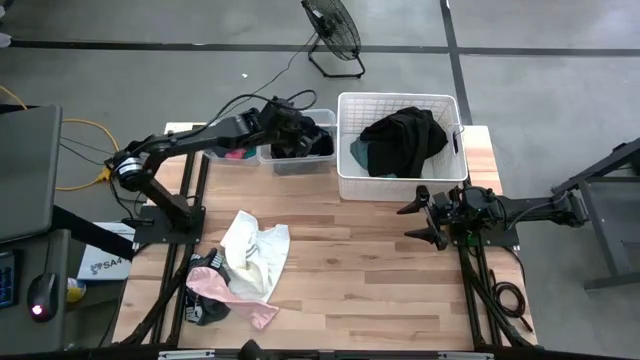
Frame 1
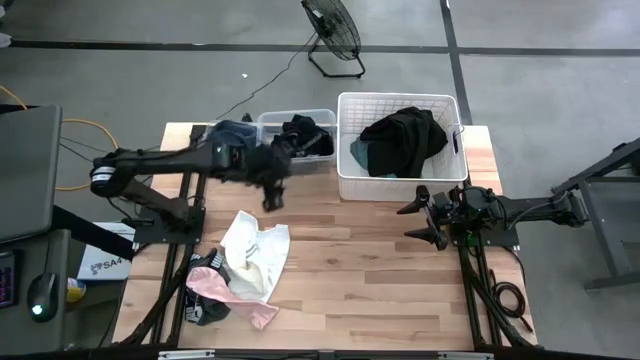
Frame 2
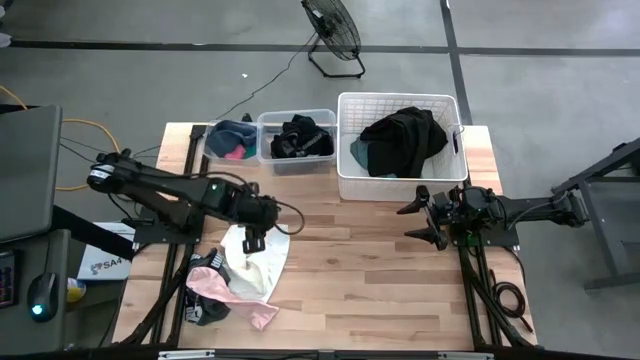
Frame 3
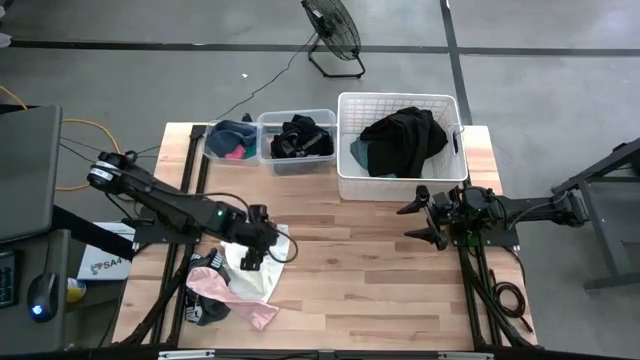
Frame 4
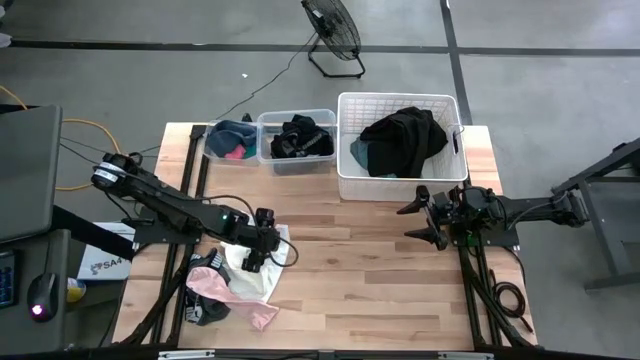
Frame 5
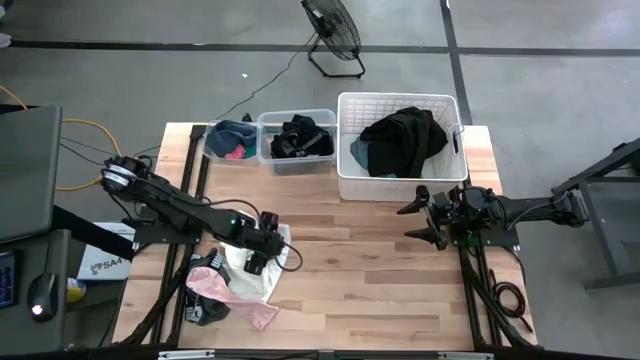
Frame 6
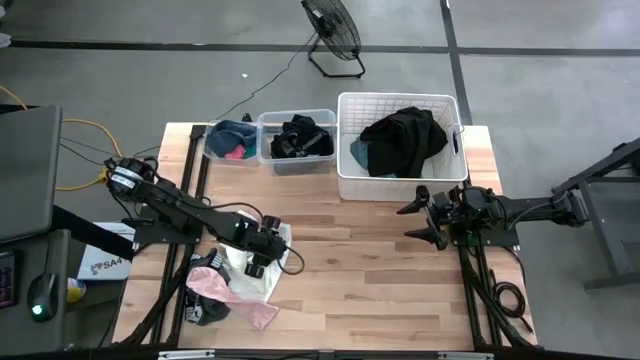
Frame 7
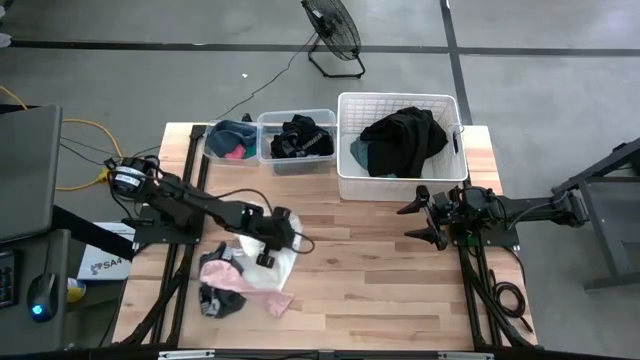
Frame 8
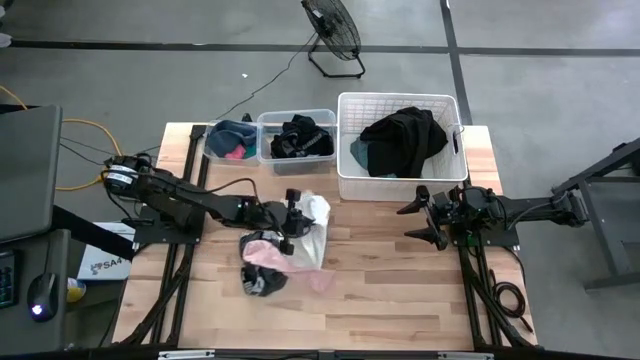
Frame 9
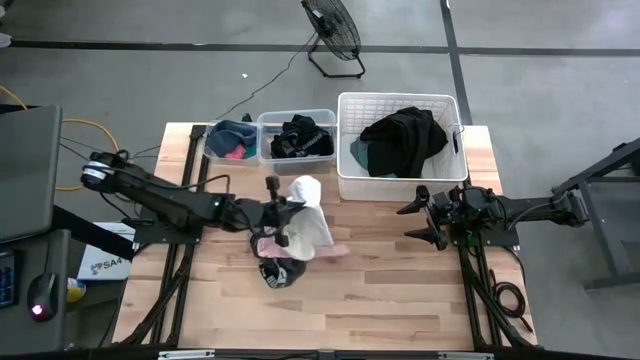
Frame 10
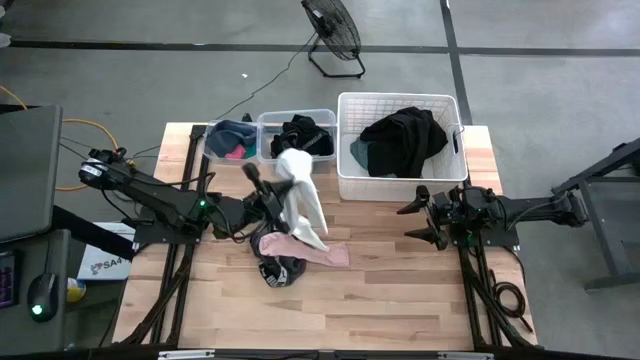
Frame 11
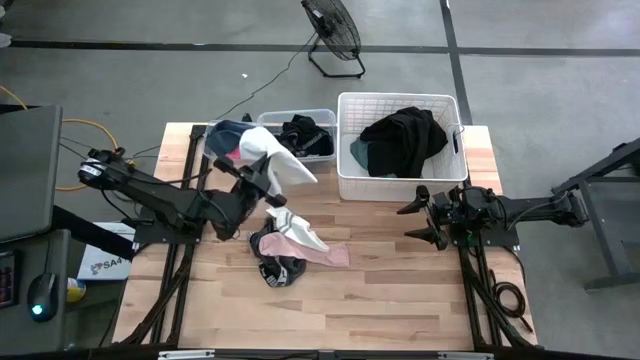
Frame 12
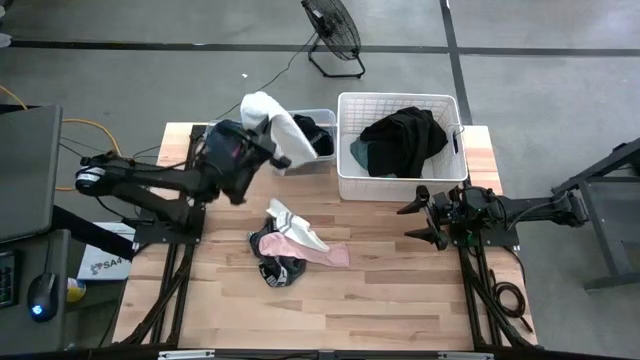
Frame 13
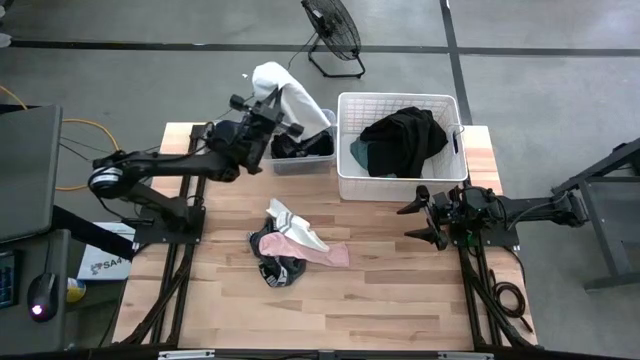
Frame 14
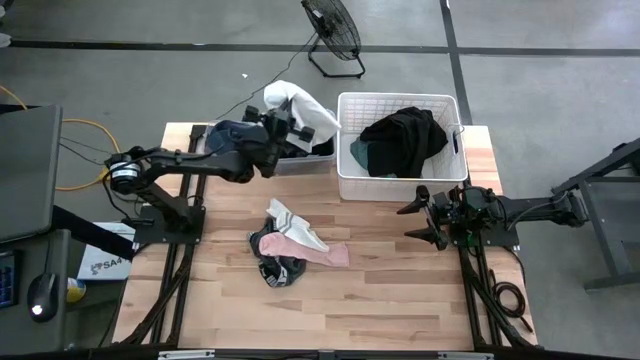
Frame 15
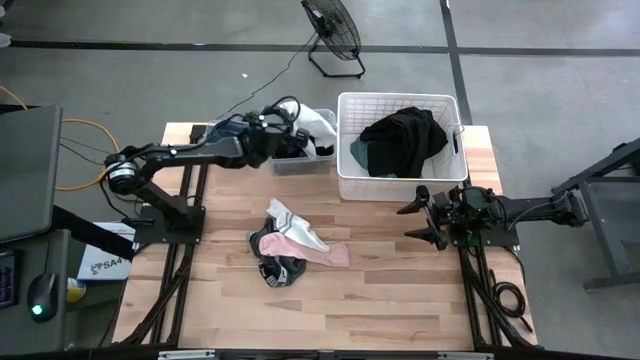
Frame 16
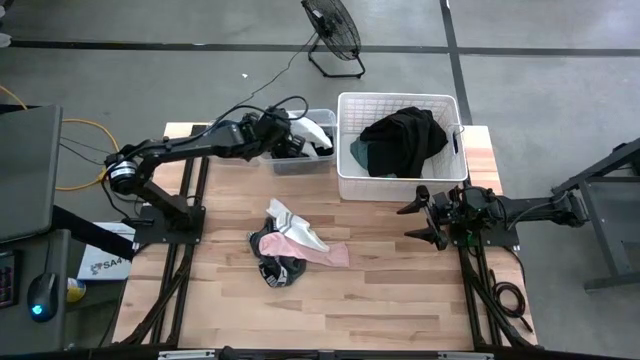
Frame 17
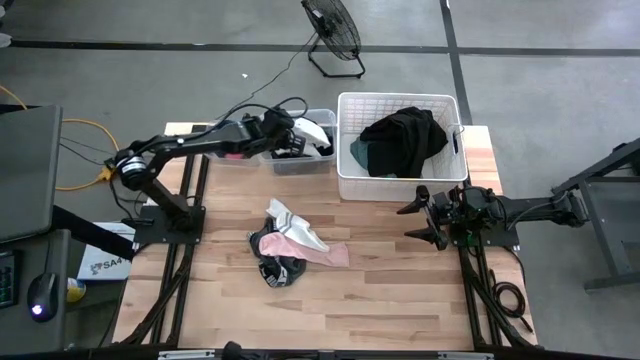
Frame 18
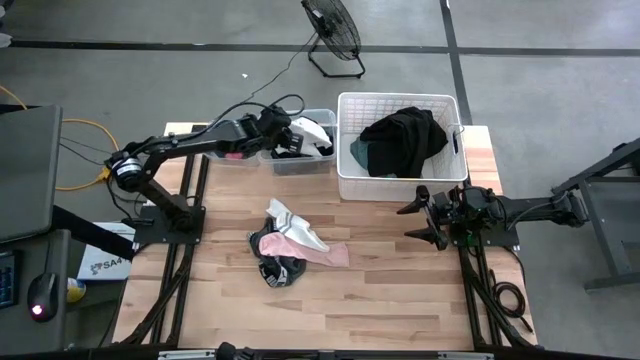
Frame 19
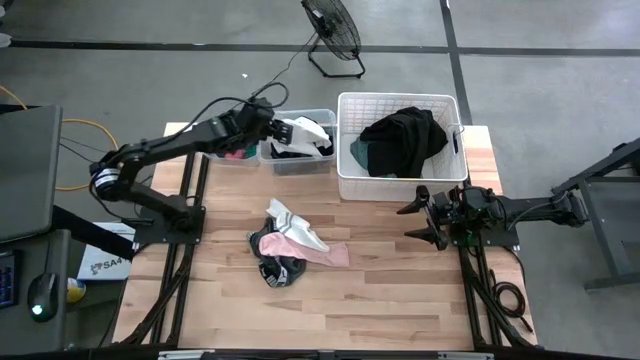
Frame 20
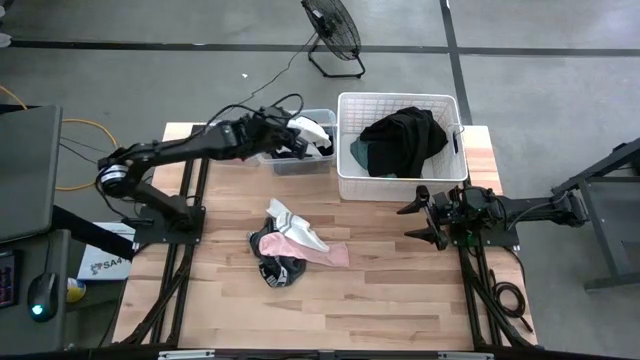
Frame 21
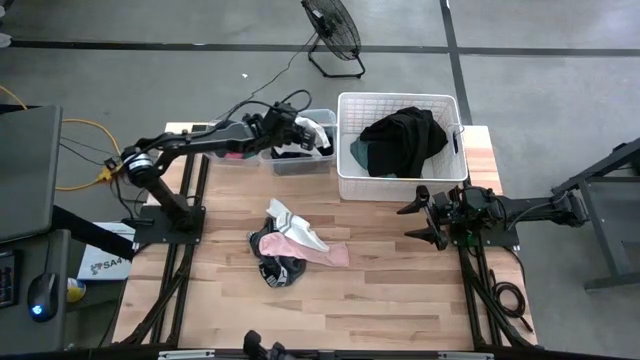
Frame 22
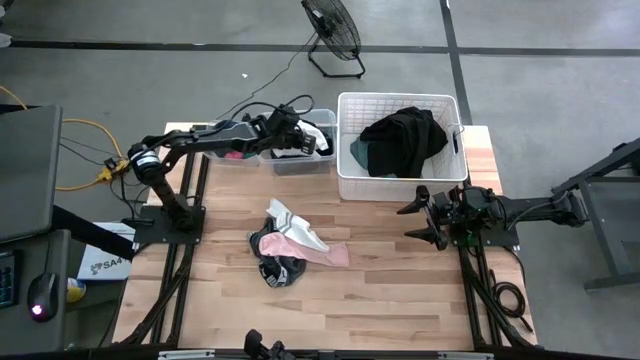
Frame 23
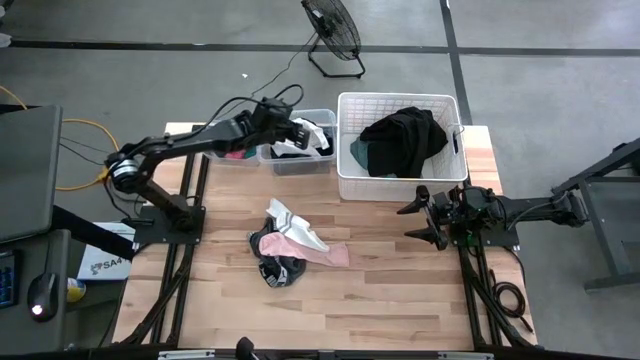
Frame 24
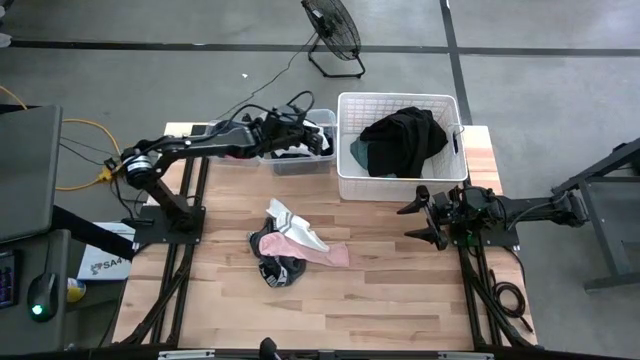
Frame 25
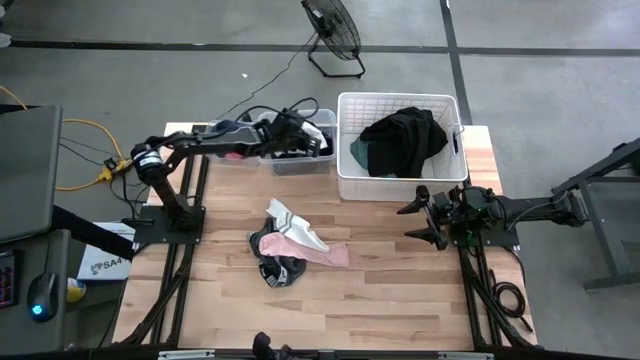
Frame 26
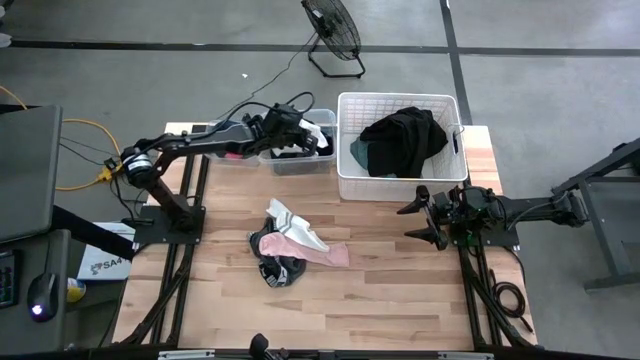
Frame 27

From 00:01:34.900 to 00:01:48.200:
Task: Pick & Place Cloths
Put the white boxer into the right transparent bin

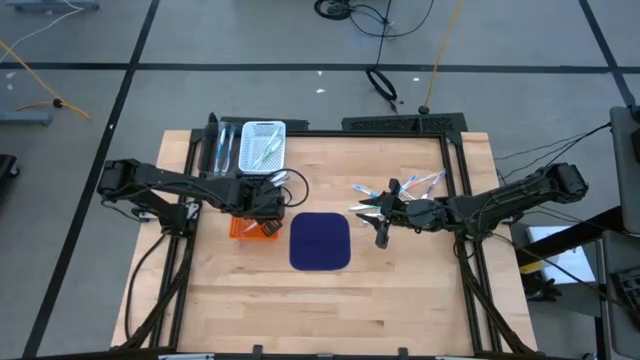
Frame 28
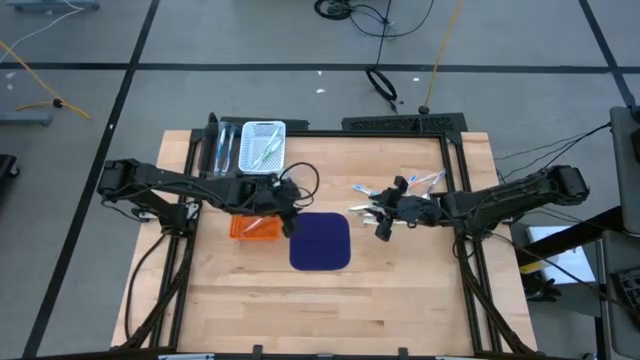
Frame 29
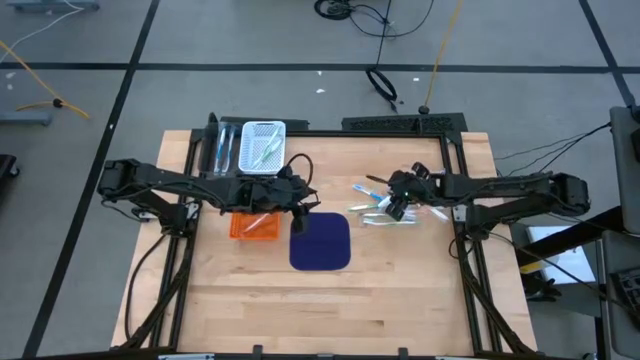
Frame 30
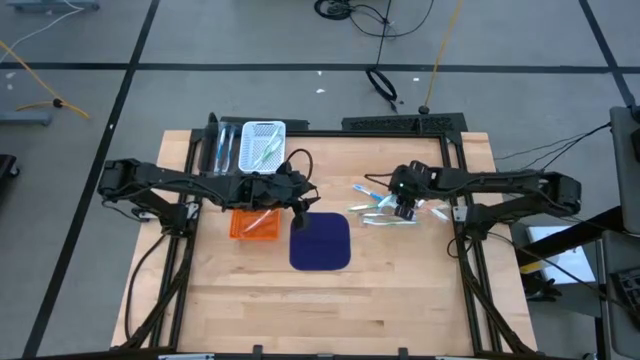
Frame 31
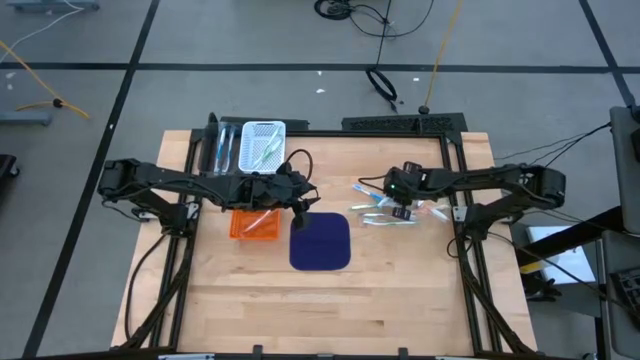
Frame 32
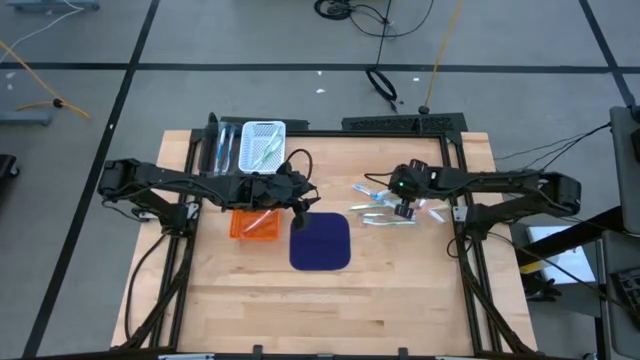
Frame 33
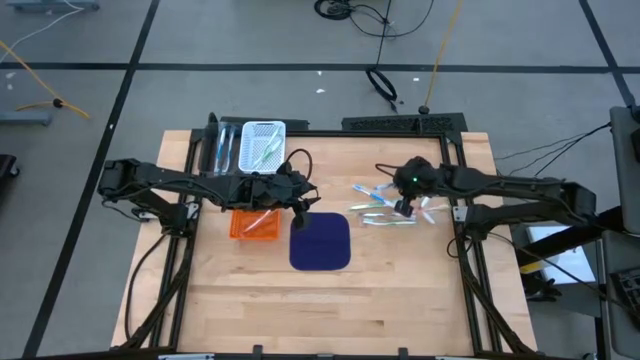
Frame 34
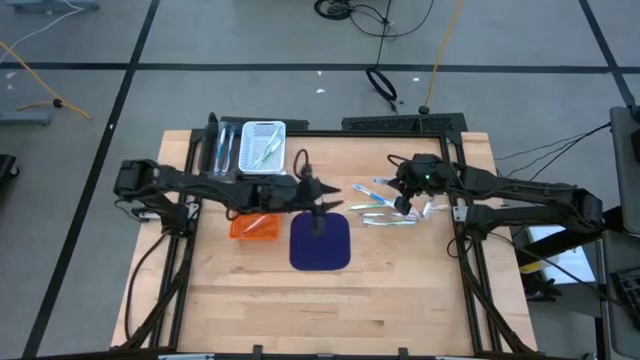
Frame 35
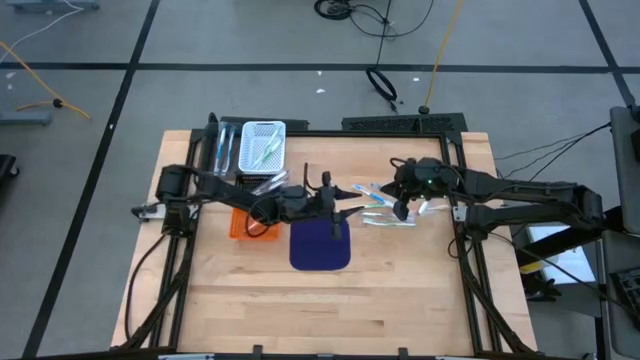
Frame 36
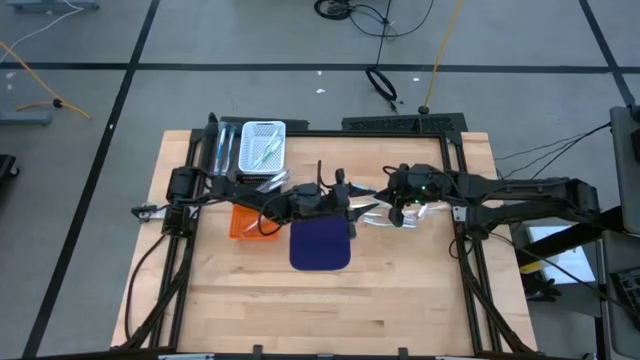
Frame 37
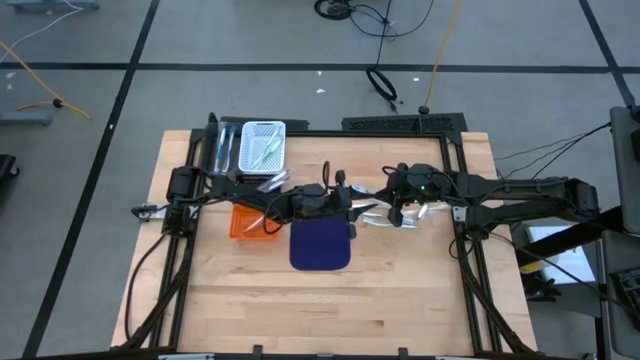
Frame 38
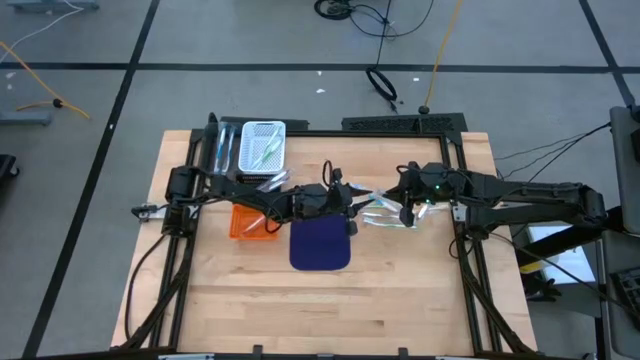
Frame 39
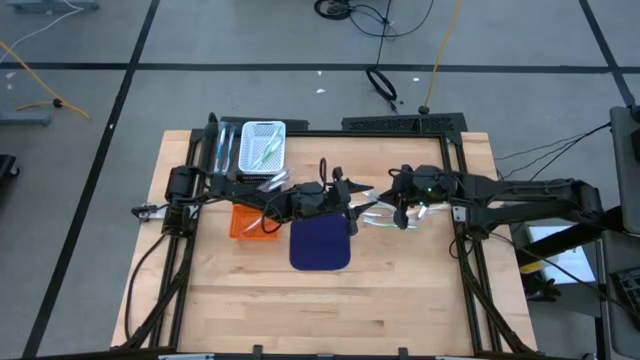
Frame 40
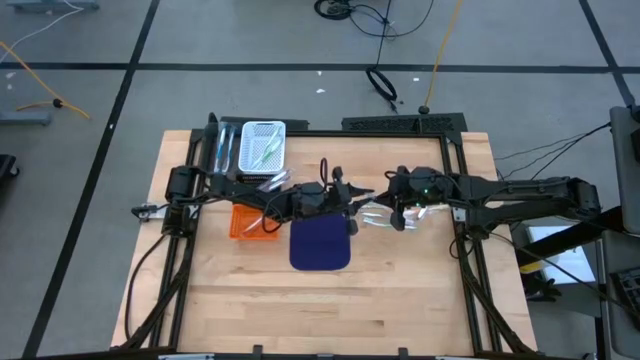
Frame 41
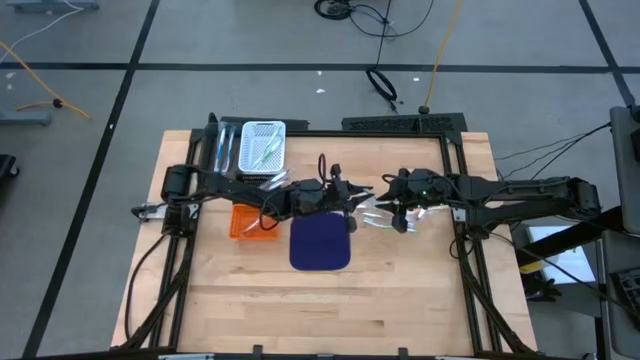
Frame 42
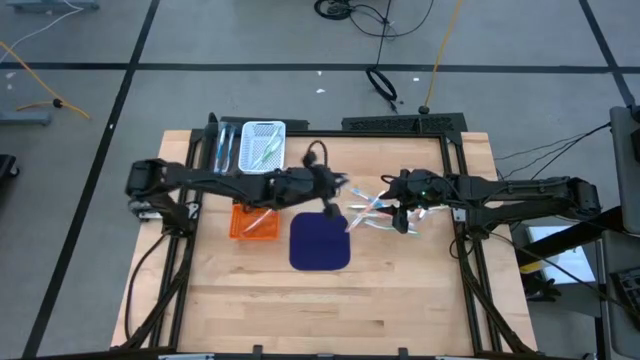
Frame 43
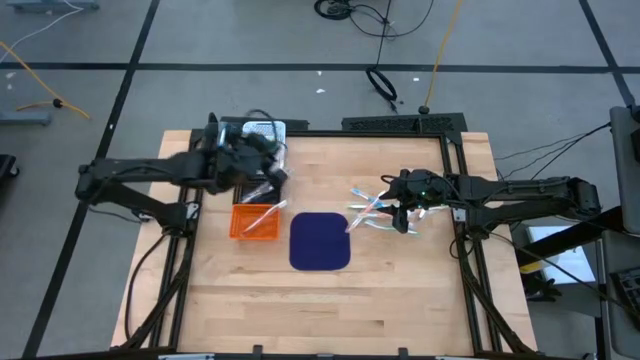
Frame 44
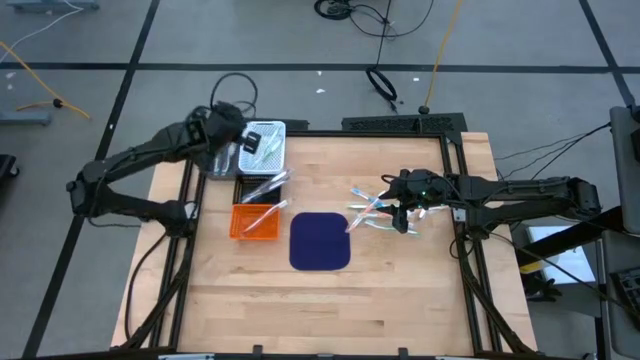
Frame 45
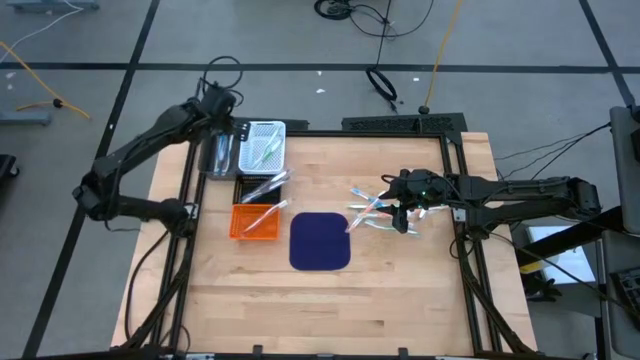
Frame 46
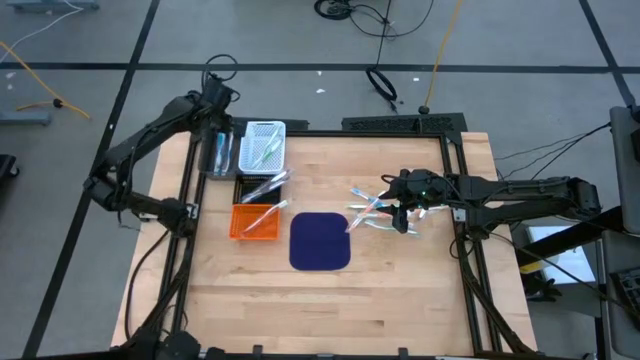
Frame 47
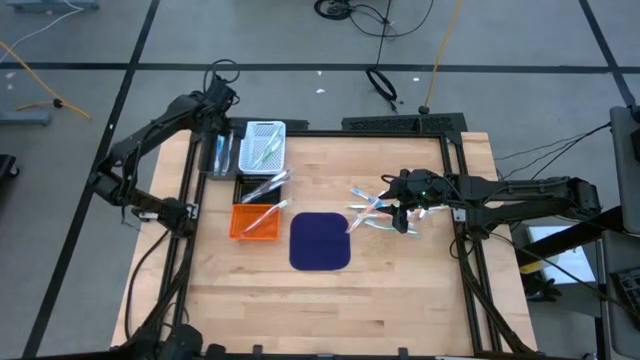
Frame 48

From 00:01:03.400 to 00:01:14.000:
Task: Pick & Place Toothbrushes
Put the blue toothbrush into the gray bin
